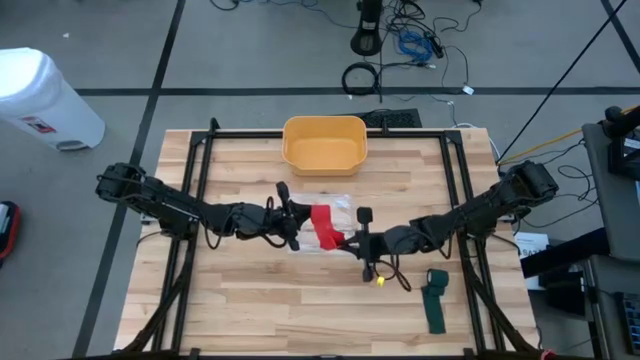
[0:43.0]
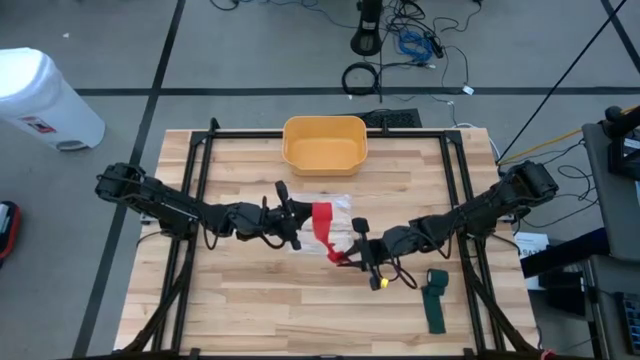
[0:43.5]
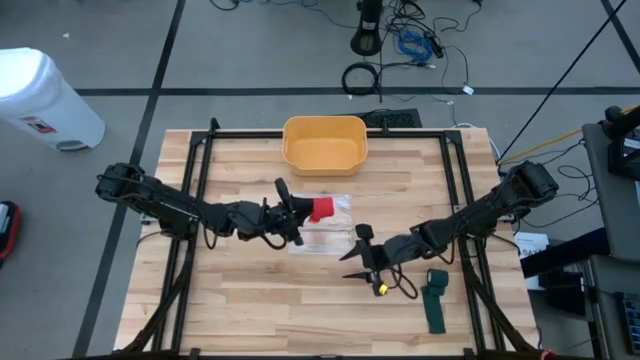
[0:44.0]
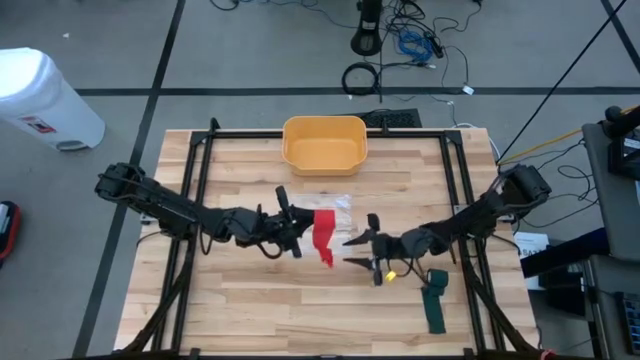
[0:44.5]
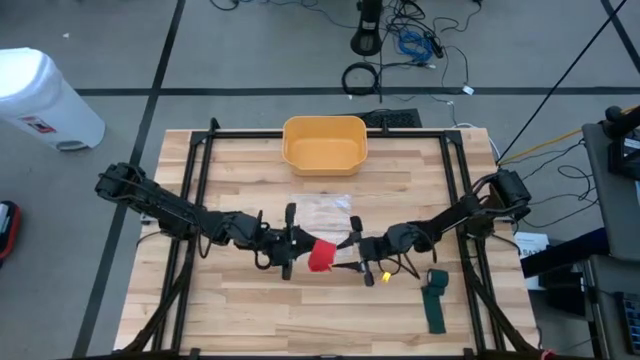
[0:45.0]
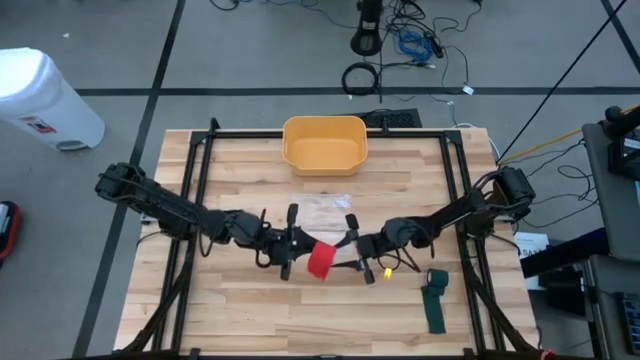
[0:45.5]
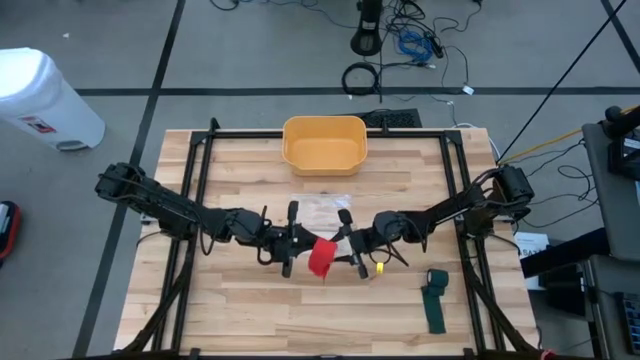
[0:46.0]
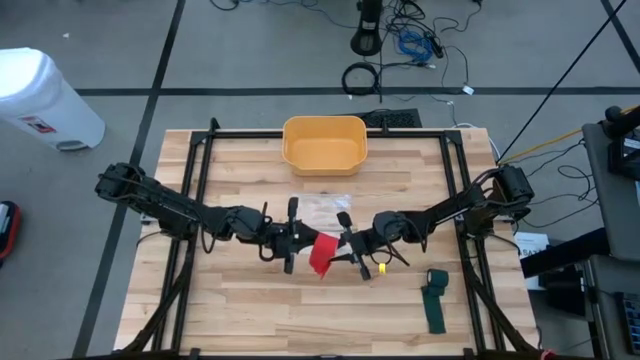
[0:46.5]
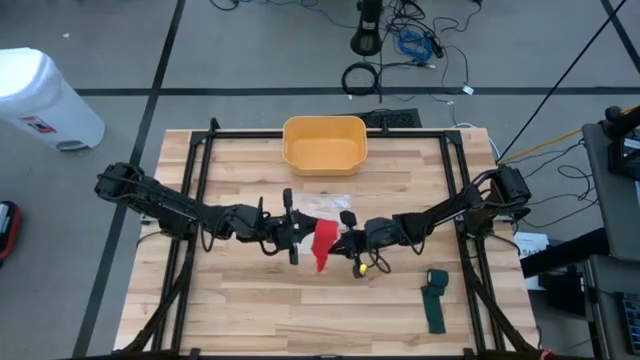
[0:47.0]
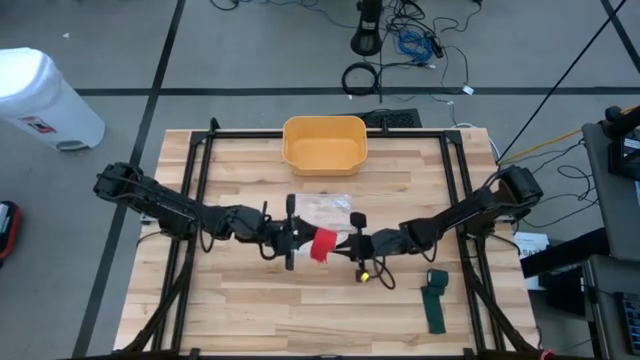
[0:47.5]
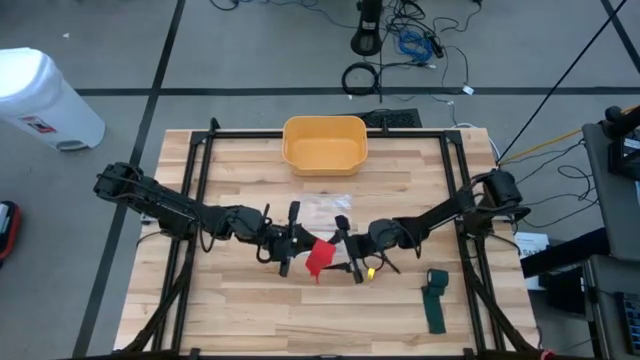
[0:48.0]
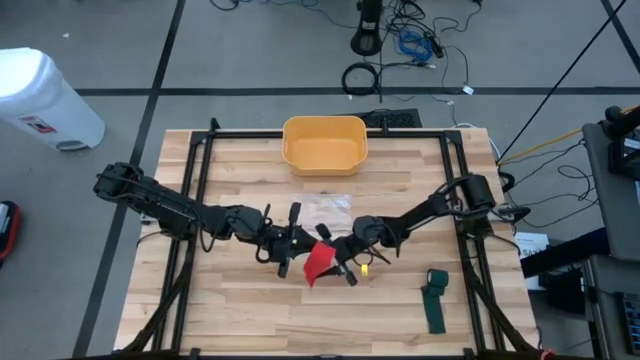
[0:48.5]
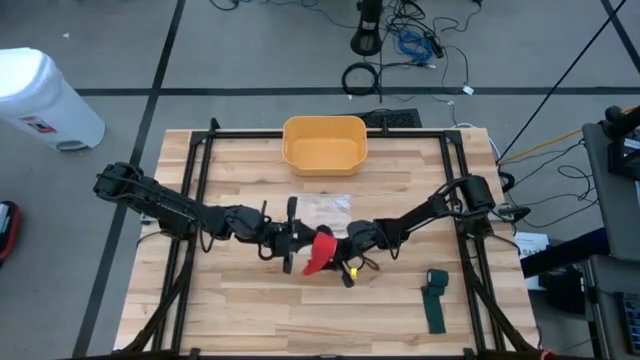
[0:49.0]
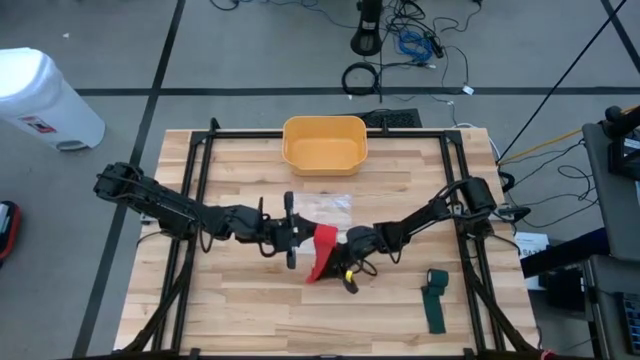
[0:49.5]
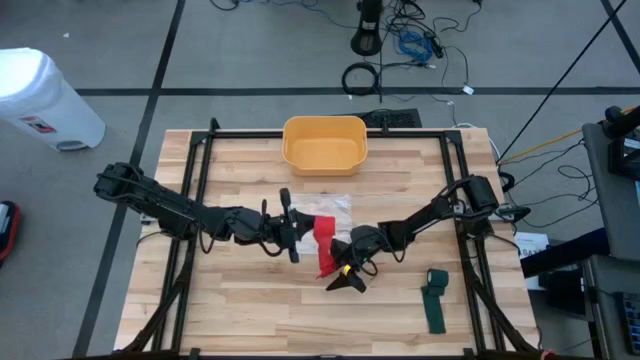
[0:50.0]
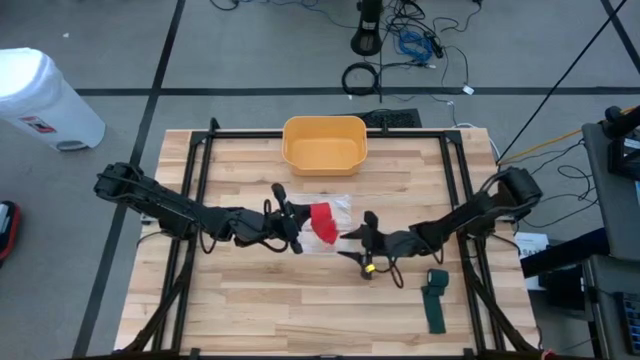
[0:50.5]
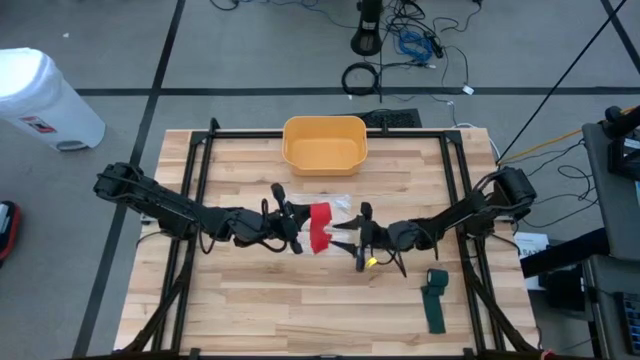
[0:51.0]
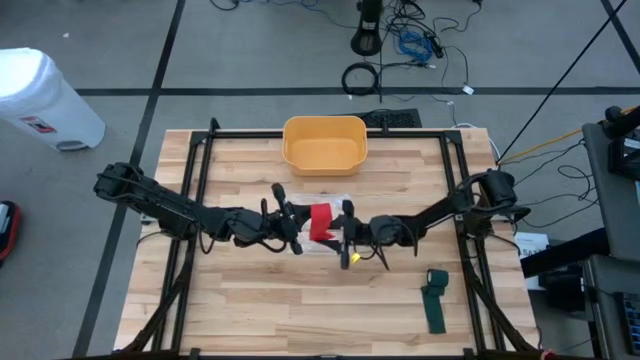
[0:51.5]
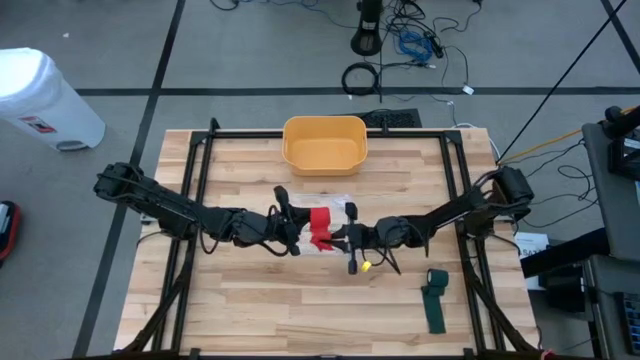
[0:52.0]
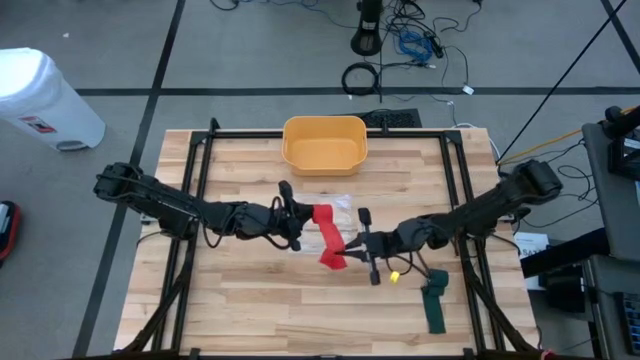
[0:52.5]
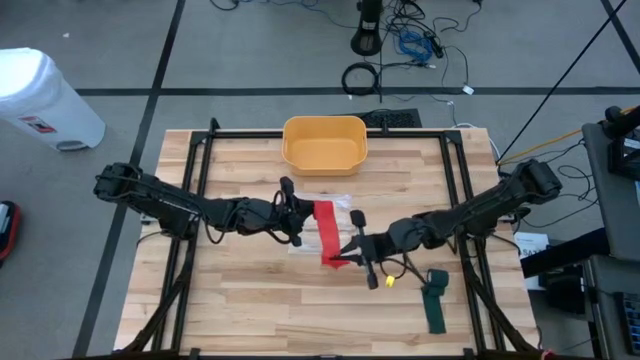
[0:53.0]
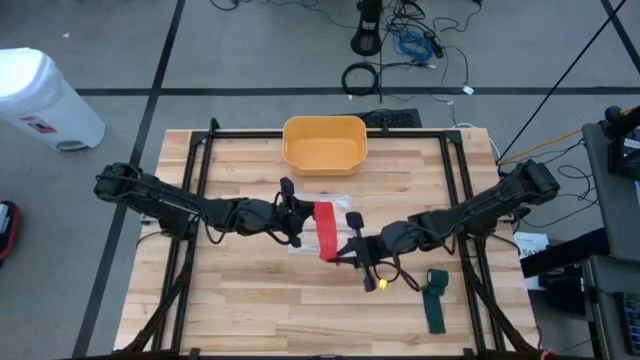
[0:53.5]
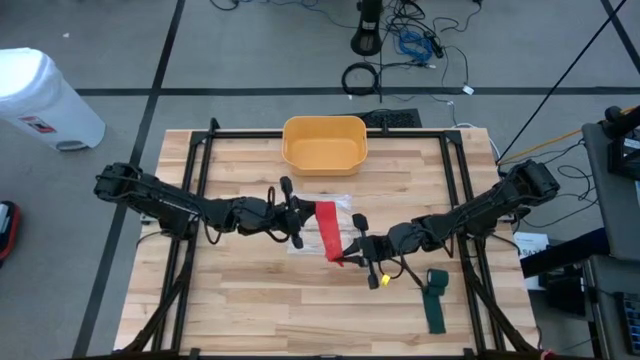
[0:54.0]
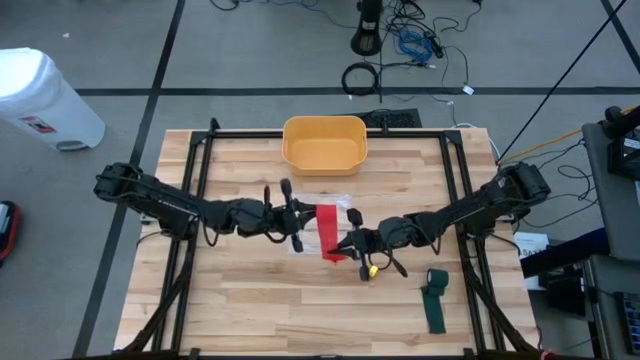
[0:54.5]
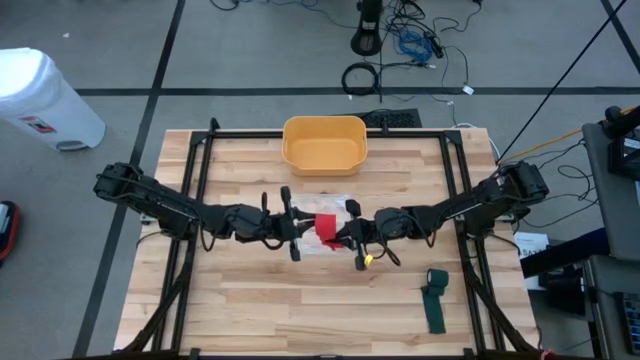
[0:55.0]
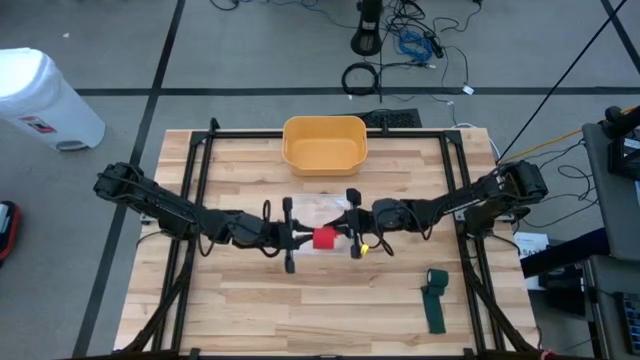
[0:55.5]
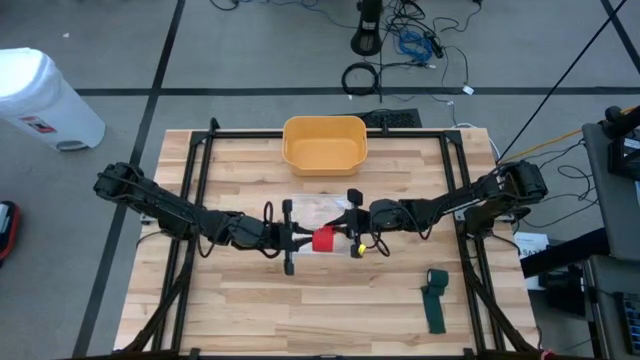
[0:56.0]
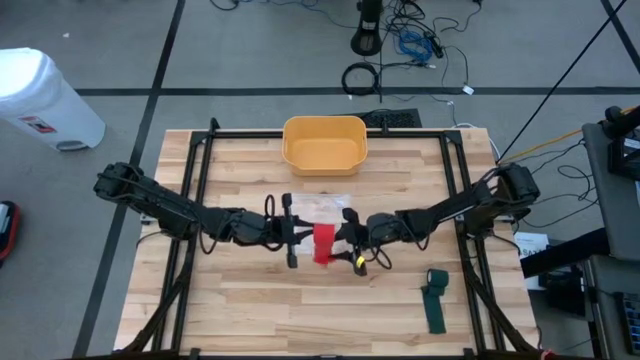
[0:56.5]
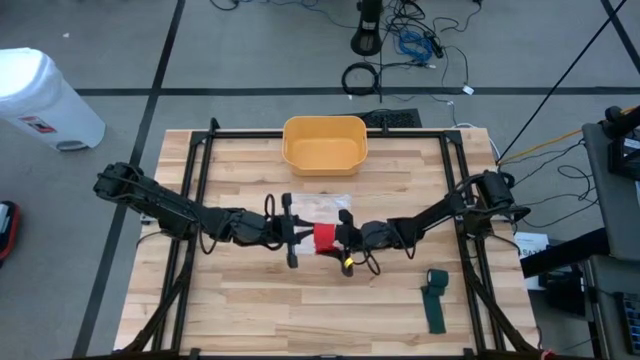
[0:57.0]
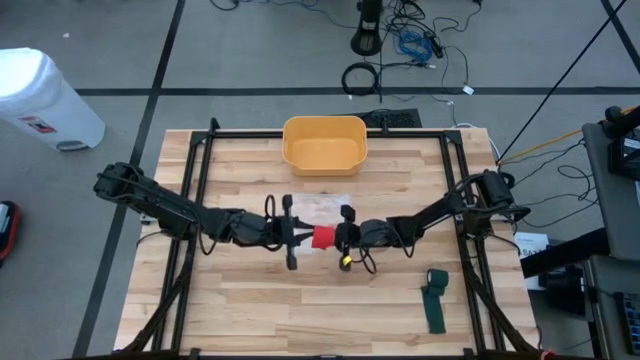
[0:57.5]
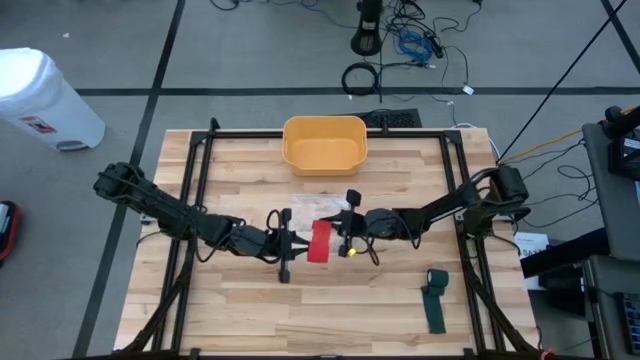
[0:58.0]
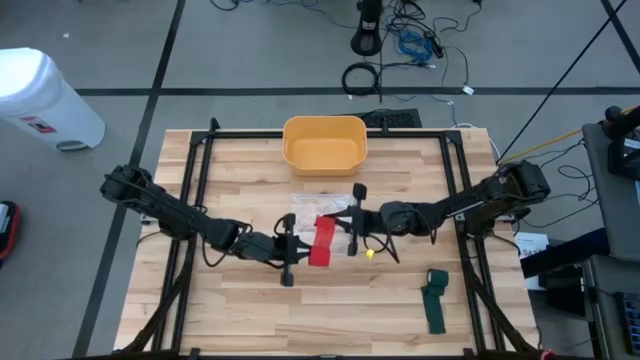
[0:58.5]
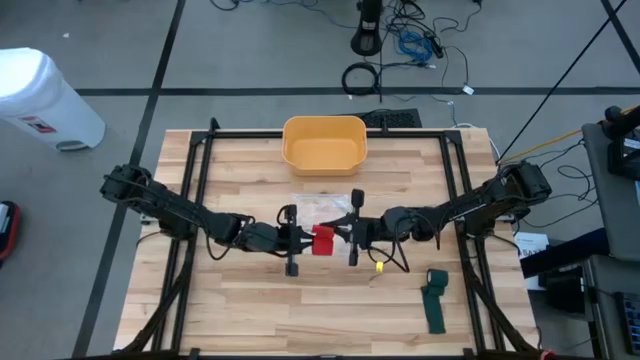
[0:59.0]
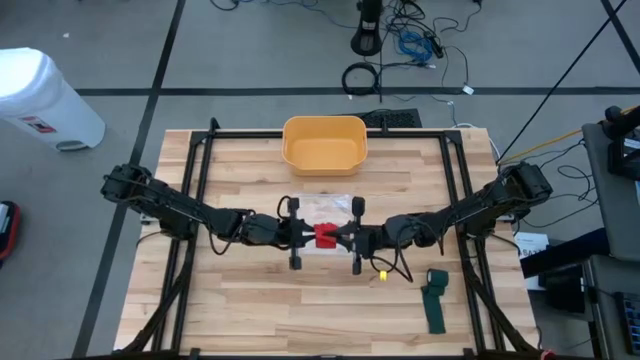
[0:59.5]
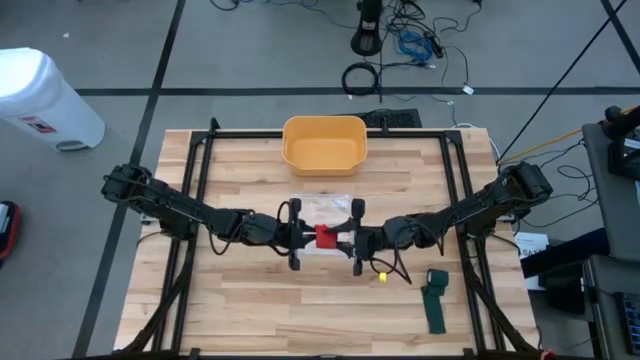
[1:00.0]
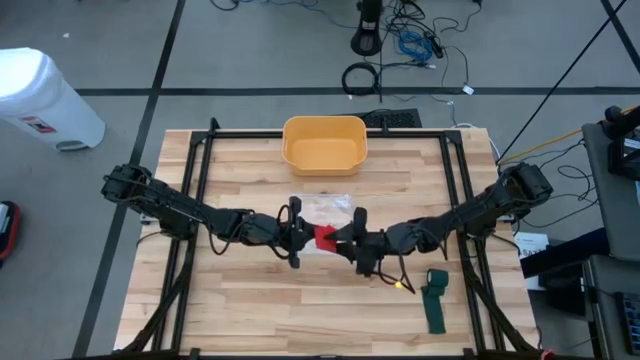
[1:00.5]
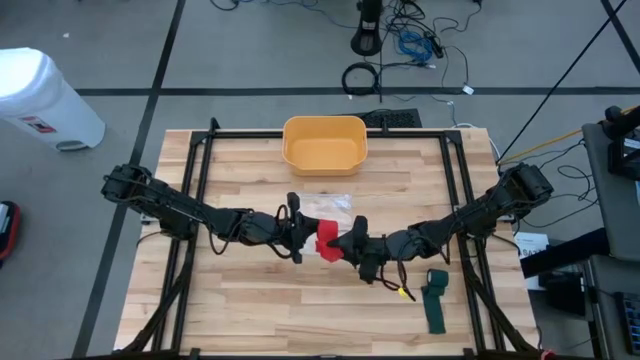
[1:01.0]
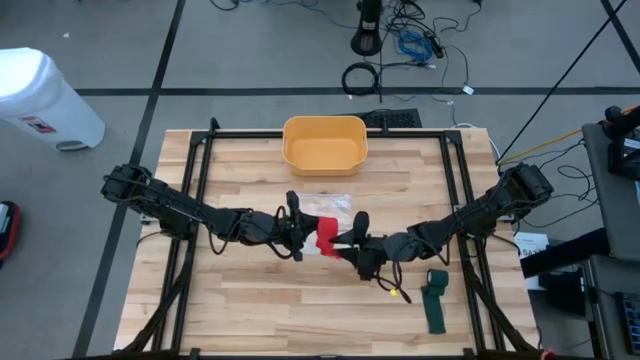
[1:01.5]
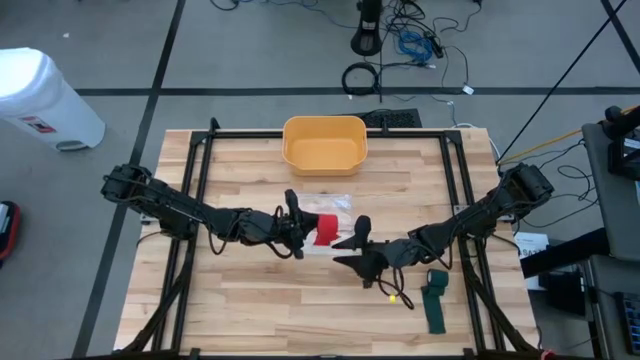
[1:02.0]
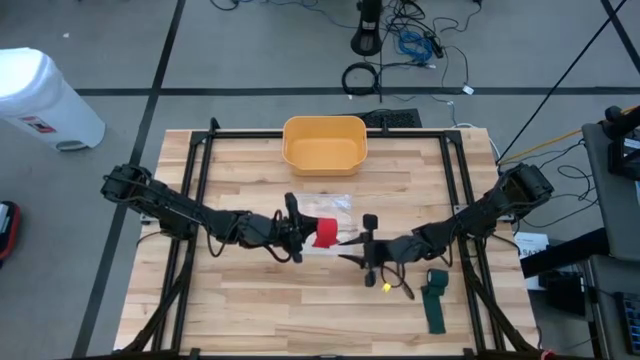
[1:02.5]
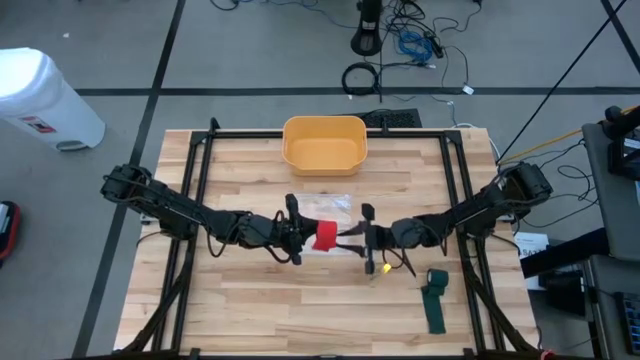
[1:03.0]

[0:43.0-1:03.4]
Task: Roll bandage
Roll the red bandage
